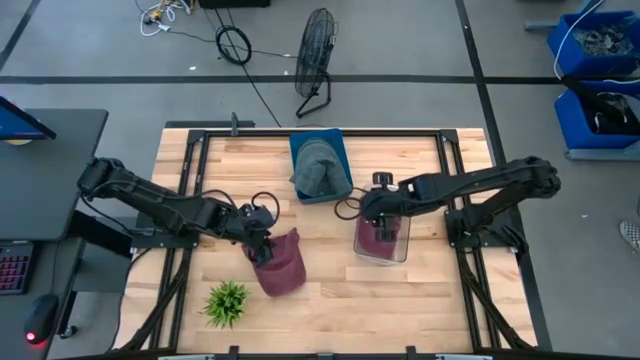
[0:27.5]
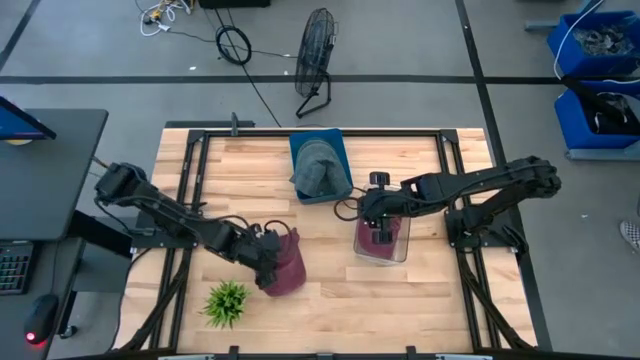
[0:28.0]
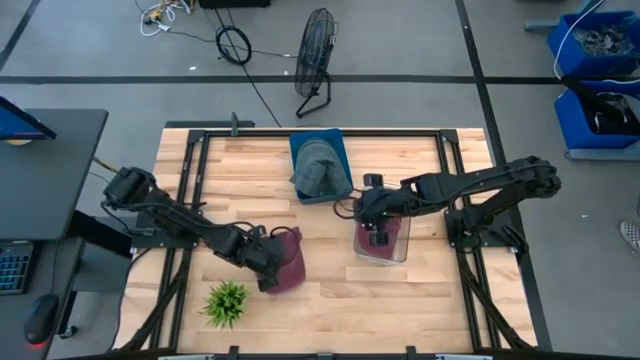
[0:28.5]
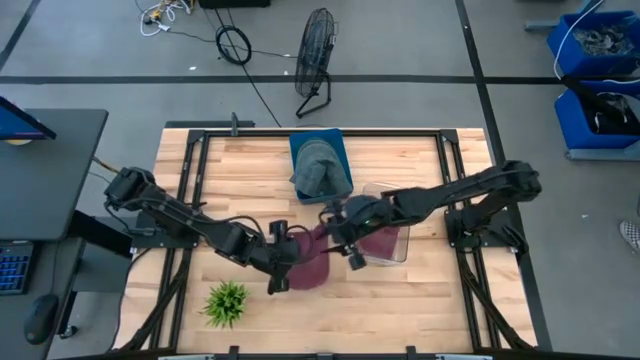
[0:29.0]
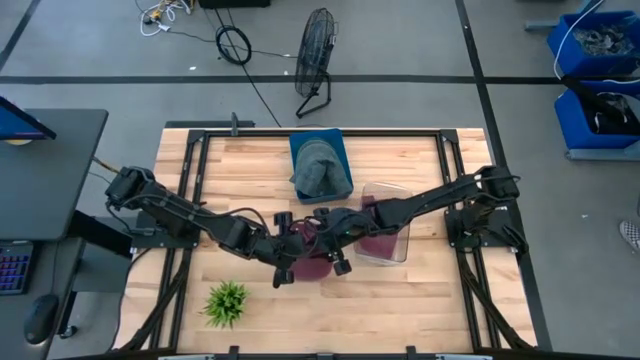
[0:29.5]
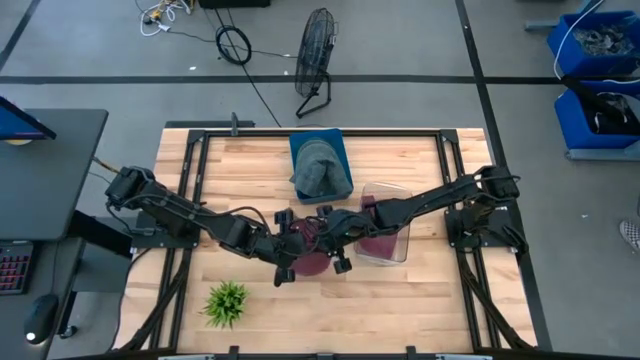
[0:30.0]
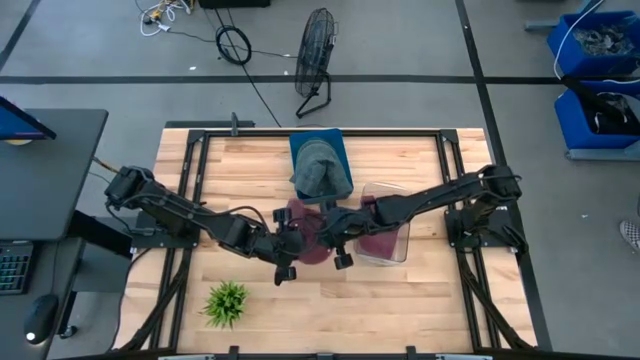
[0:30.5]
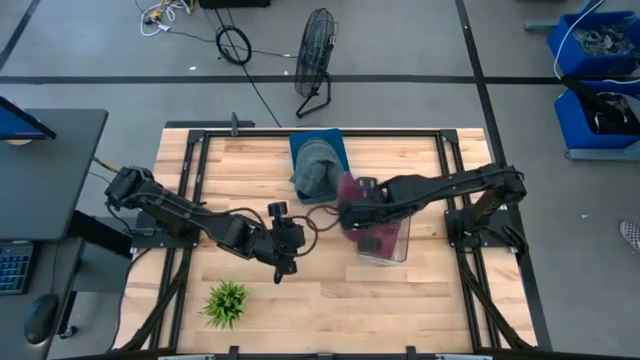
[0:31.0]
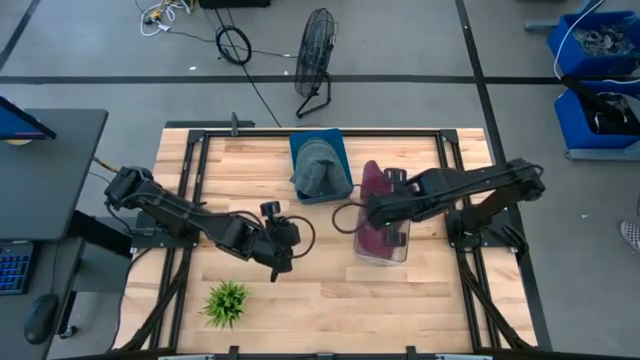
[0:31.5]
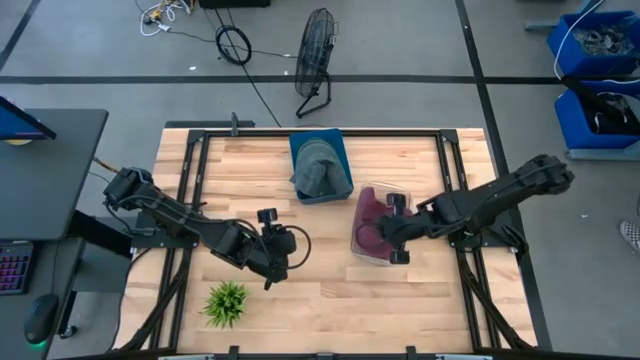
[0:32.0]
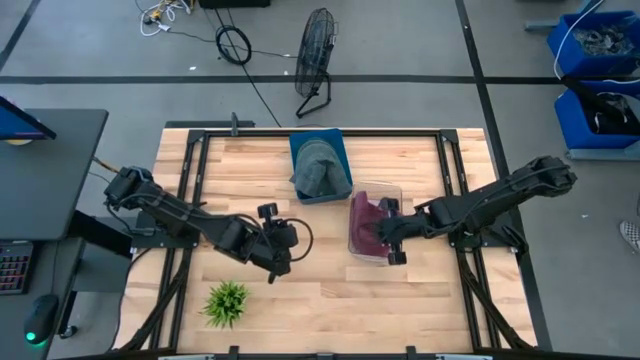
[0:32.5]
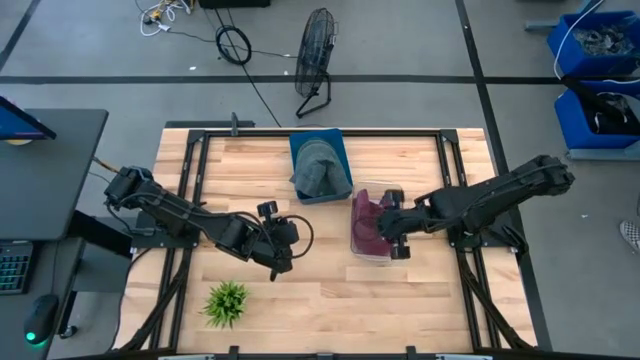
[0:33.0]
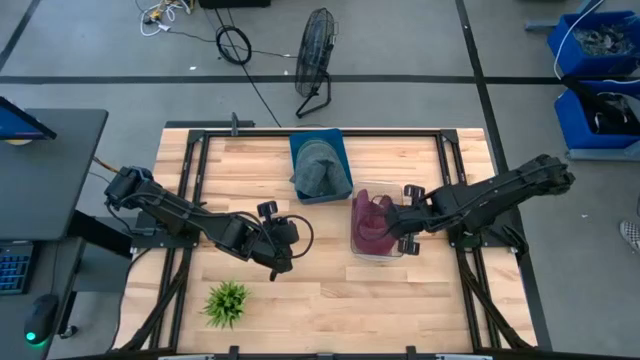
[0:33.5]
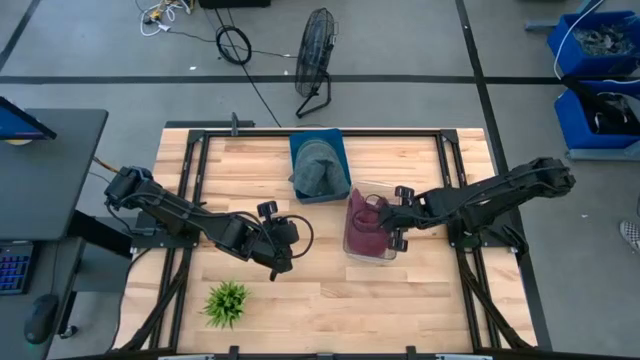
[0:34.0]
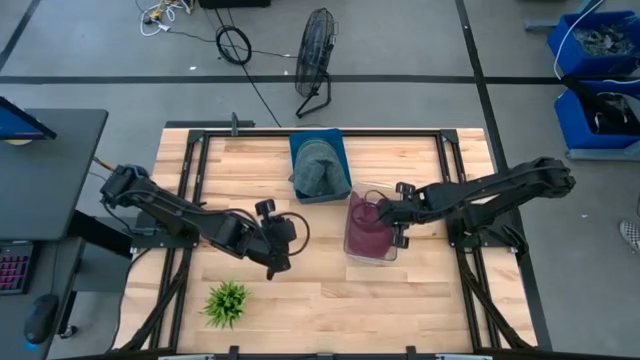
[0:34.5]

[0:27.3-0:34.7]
Task: Pick & Place hat
Put the red cap into the transparent bin

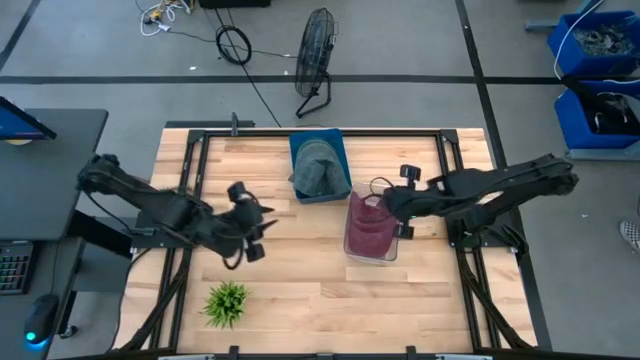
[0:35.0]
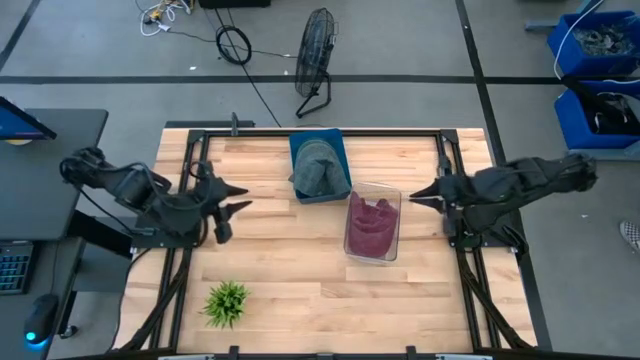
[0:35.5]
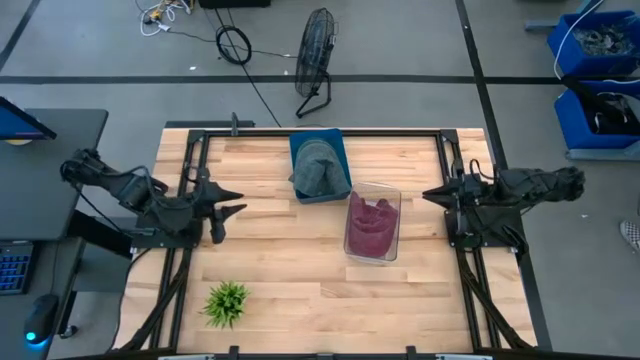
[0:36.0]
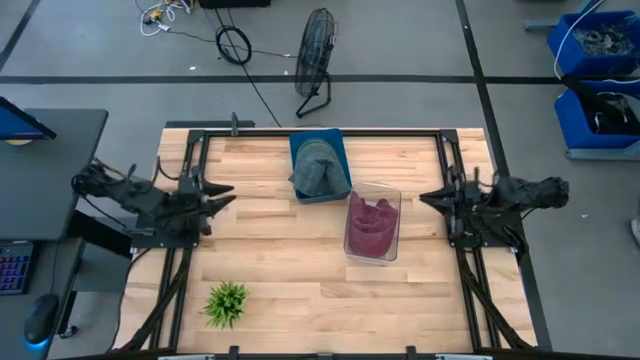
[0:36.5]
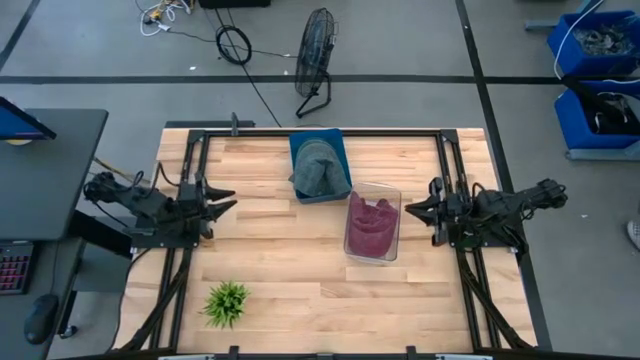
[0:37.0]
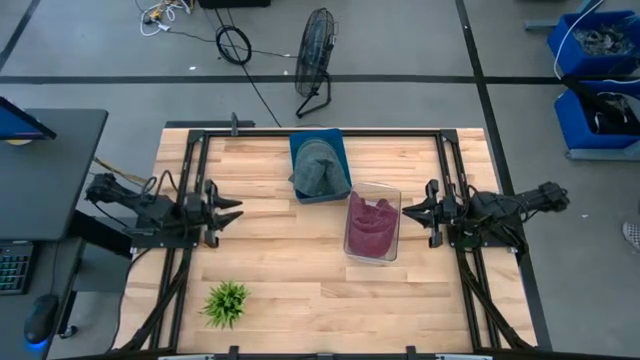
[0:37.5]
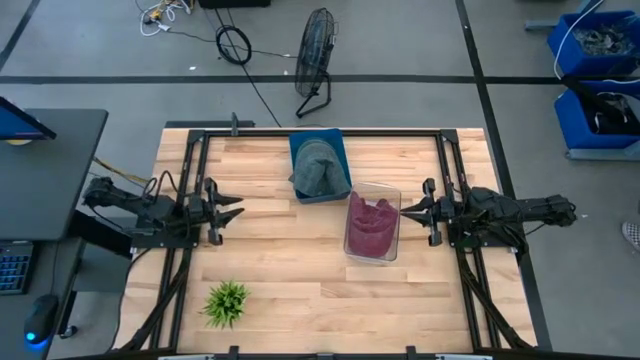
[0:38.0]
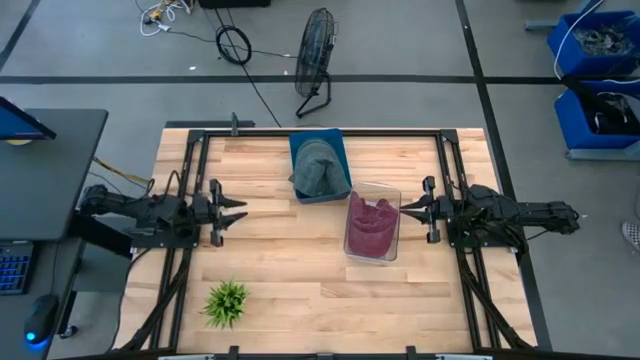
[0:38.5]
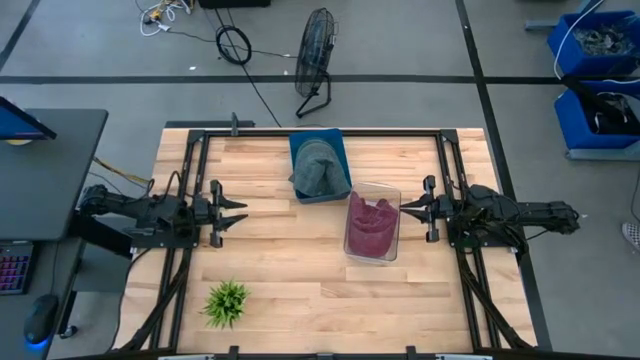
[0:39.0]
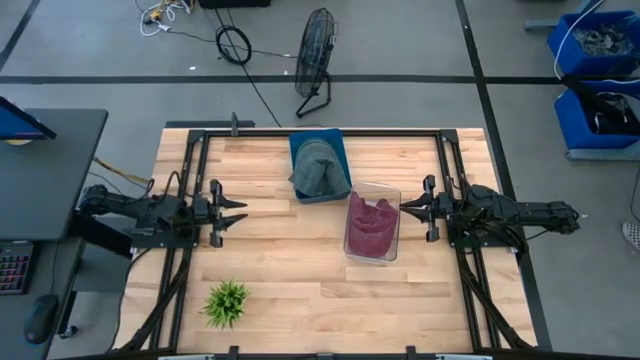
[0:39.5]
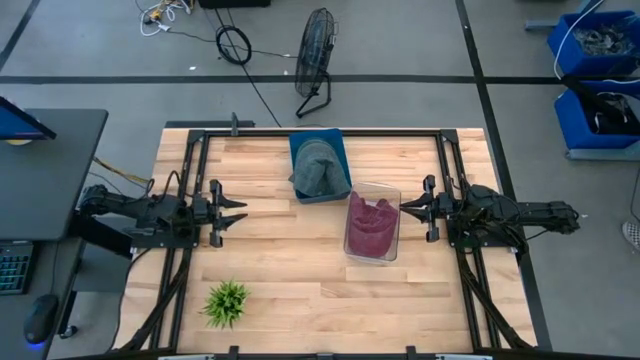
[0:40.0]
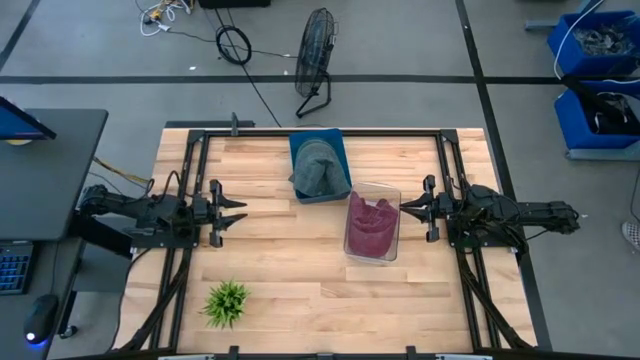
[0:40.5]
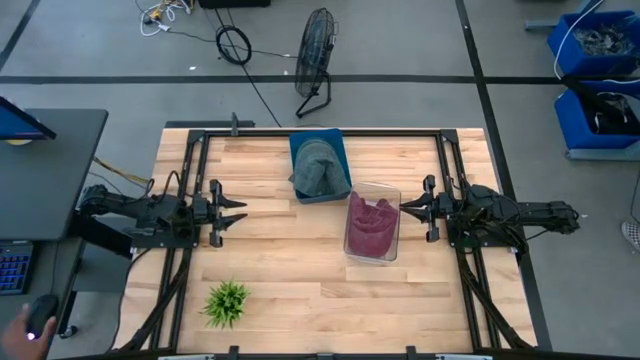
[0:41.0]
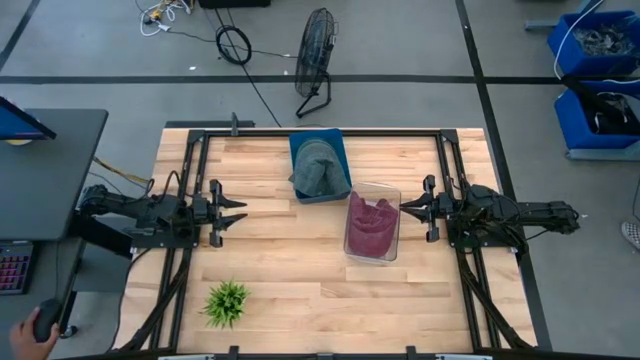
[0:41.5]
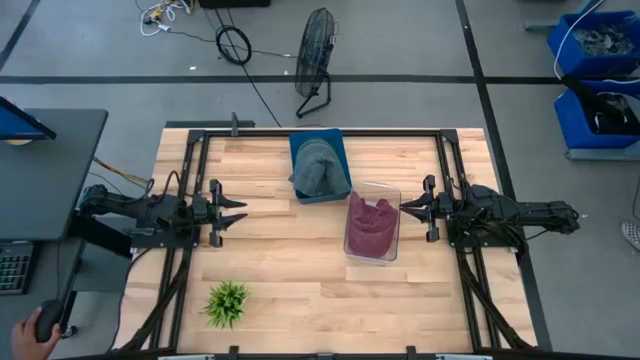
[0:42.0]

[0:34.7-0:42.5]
Return to home position

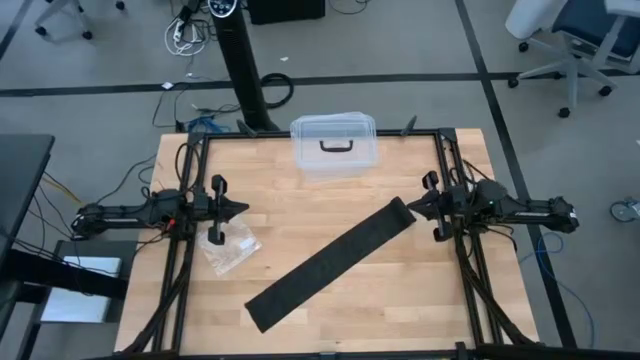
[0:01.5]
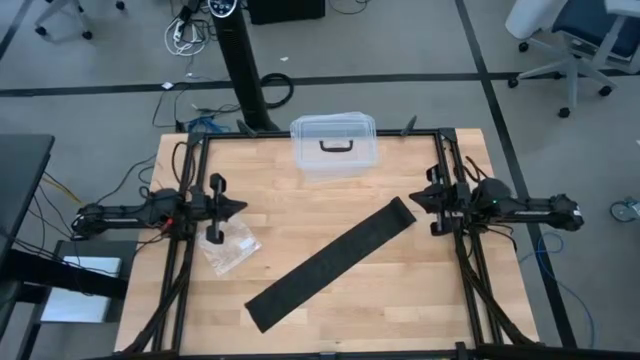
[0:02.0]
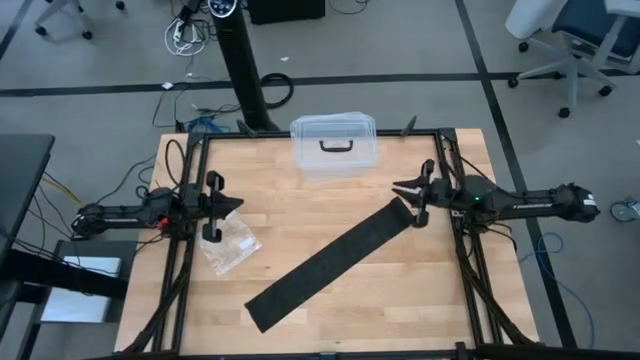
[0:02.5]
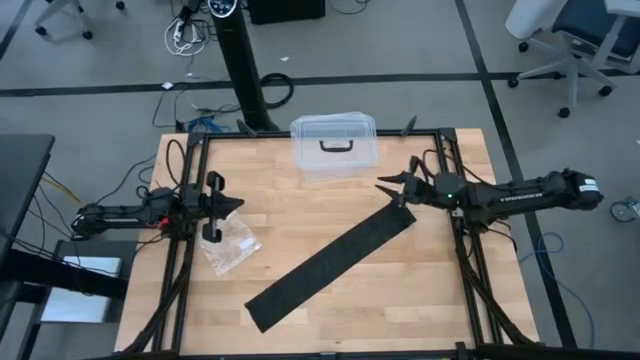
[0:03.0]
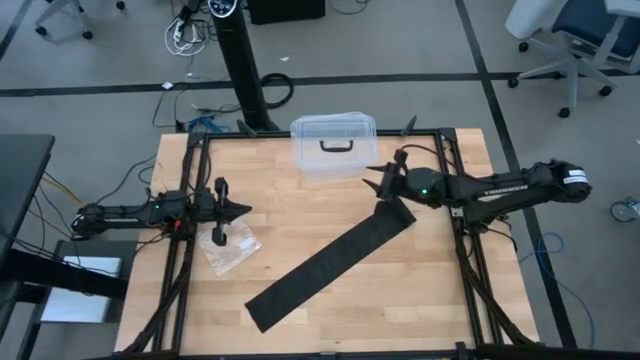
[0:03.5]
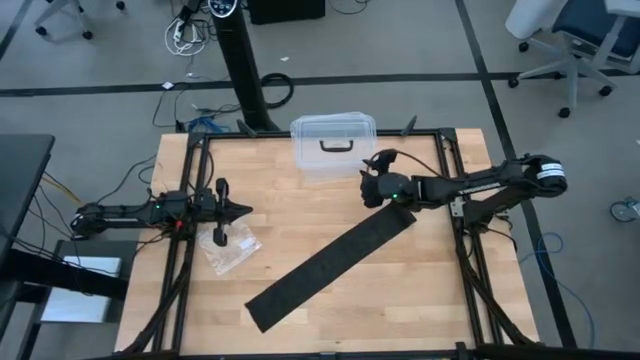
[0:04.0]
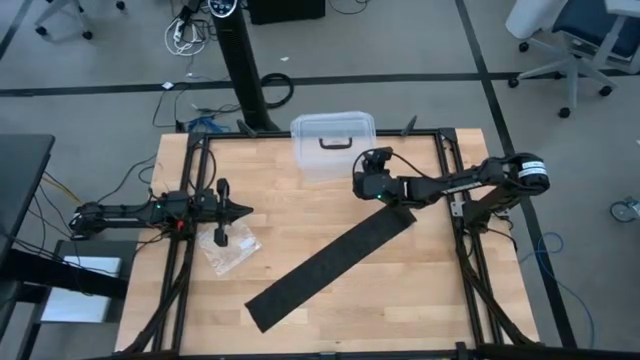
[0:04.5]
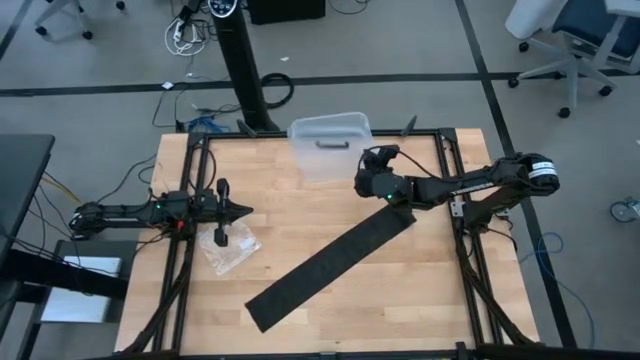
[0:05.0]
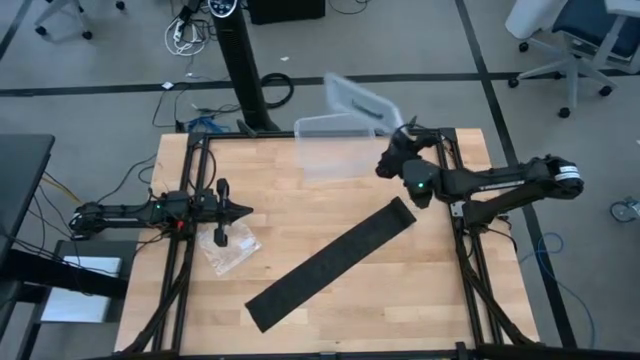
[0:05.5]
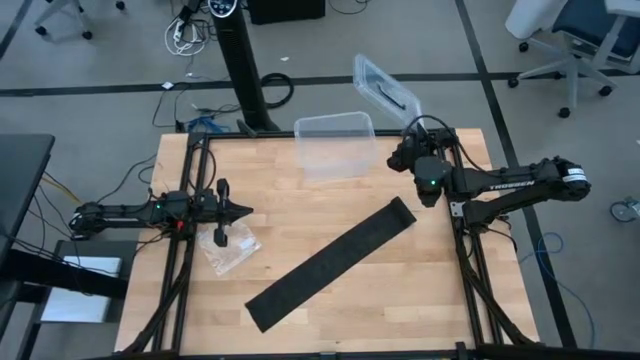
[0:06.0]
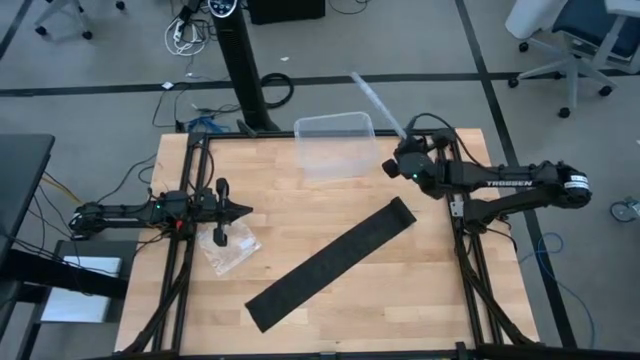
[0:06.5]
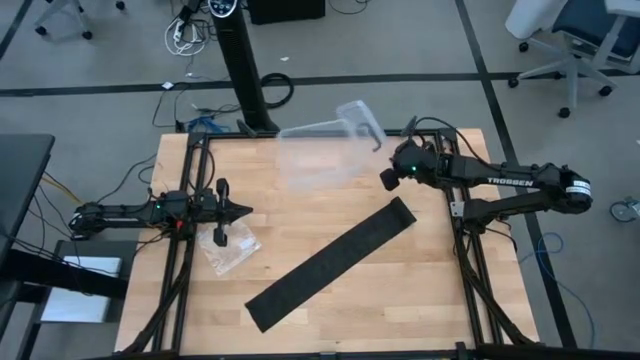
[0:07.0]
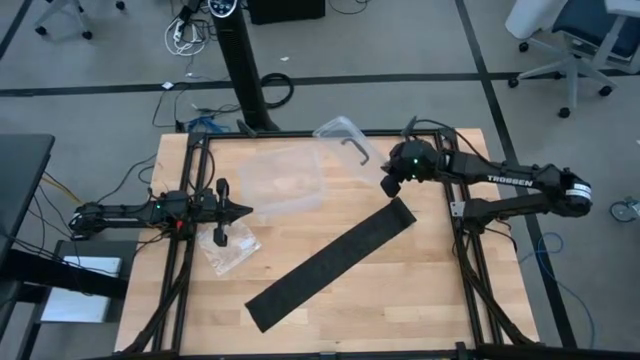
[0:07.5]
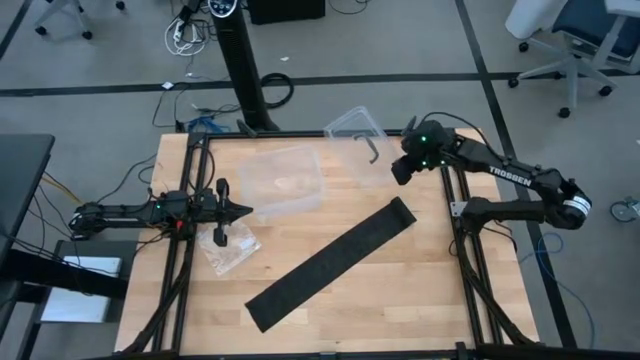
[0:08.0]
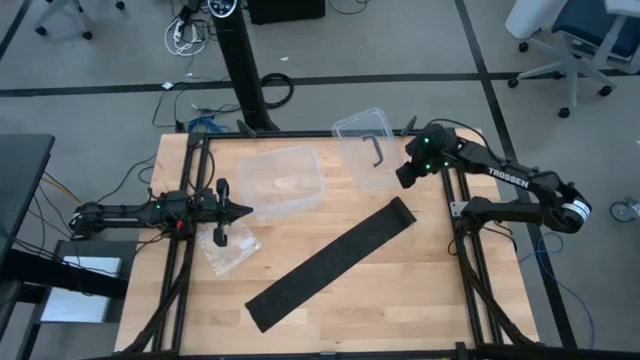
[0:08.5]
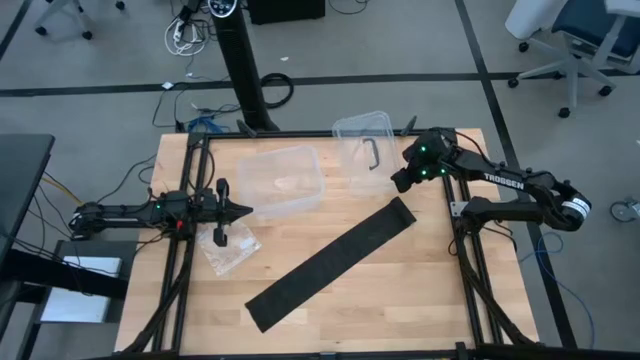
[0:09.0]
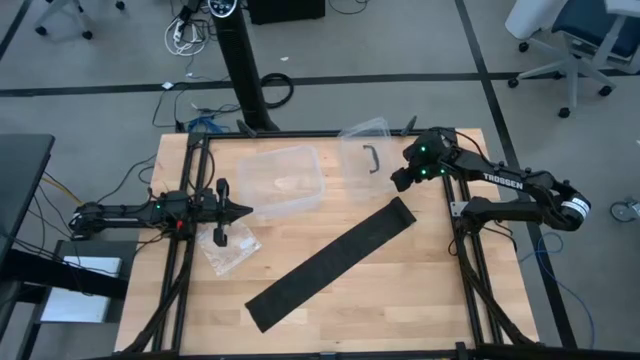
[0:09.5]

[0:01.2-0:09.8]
Task: Roll bandage
Open the transparent bin
